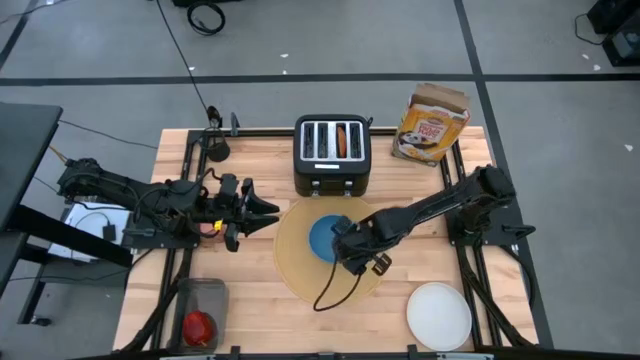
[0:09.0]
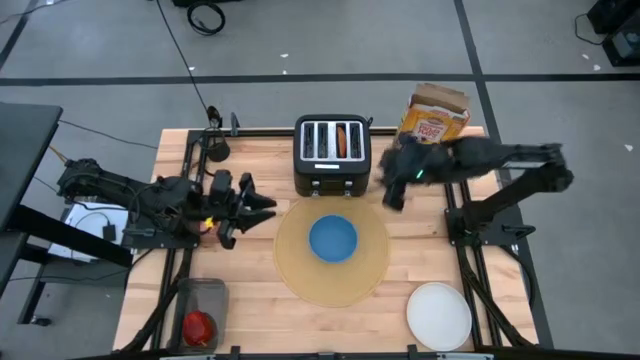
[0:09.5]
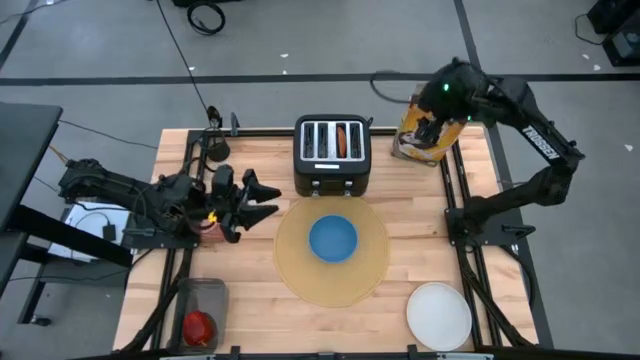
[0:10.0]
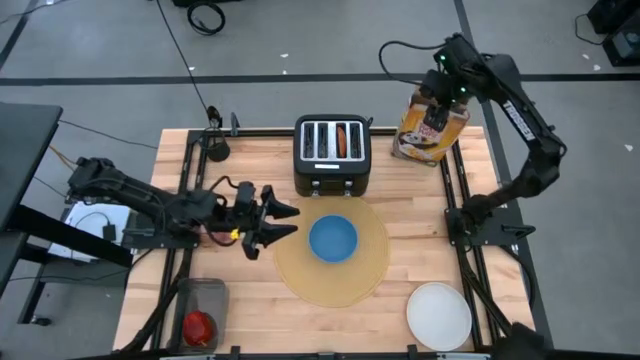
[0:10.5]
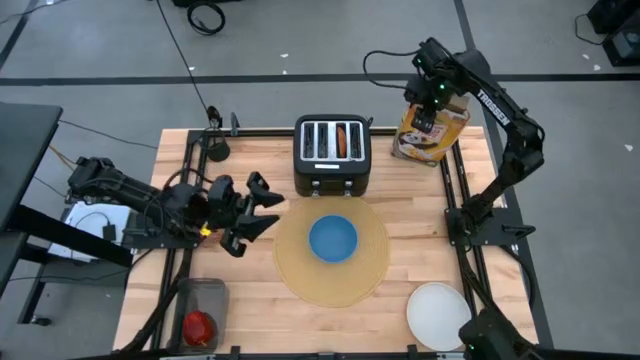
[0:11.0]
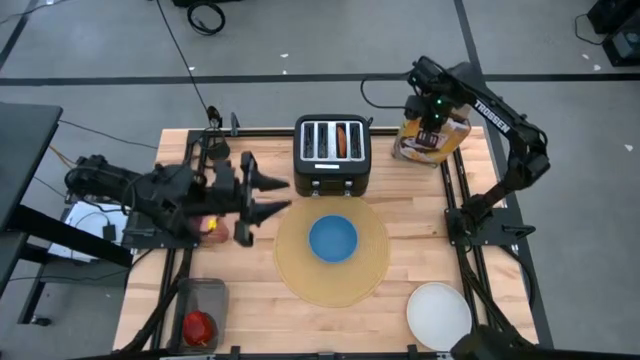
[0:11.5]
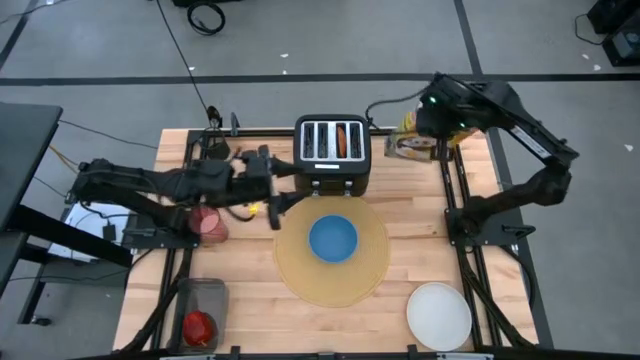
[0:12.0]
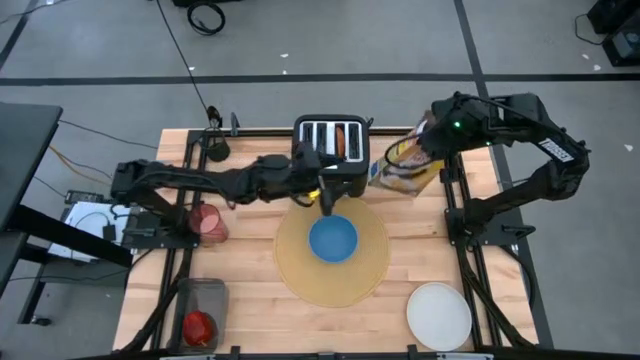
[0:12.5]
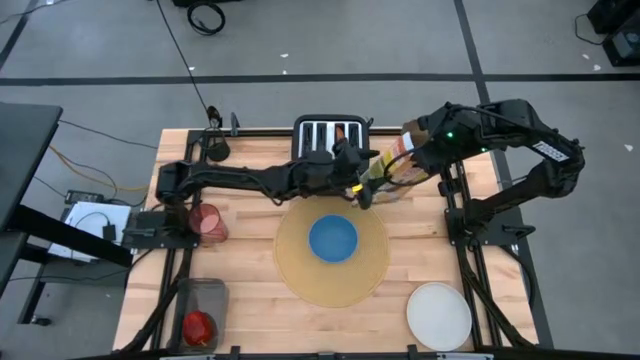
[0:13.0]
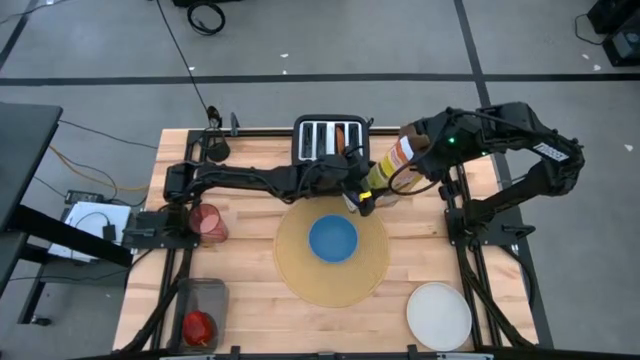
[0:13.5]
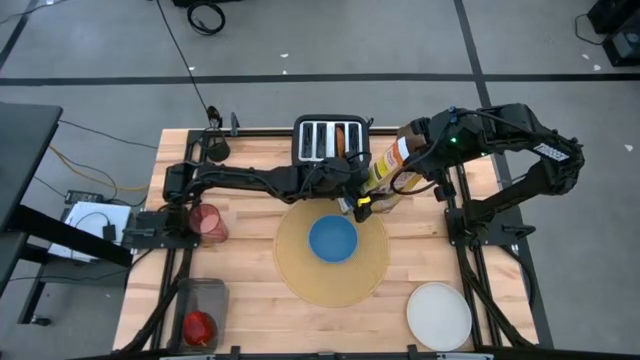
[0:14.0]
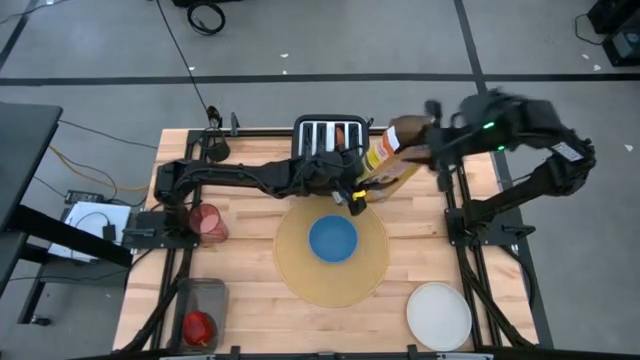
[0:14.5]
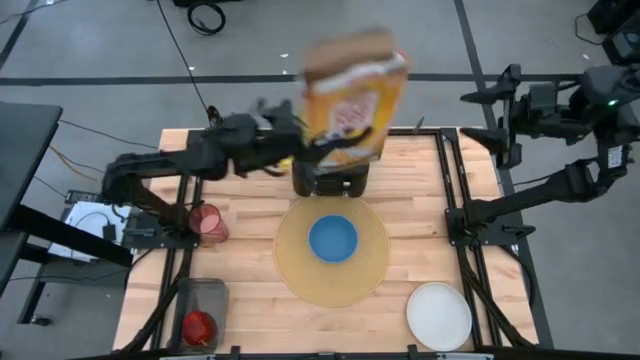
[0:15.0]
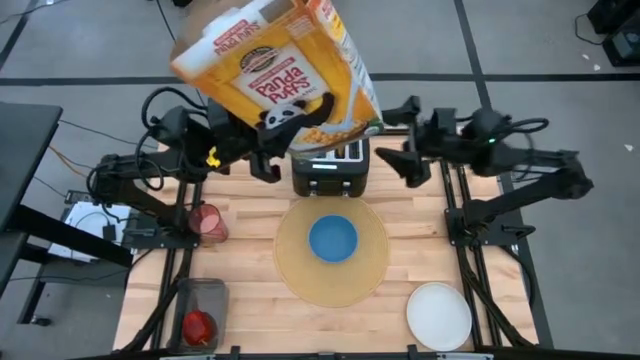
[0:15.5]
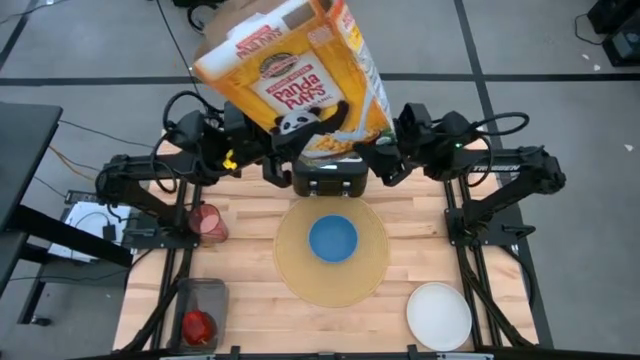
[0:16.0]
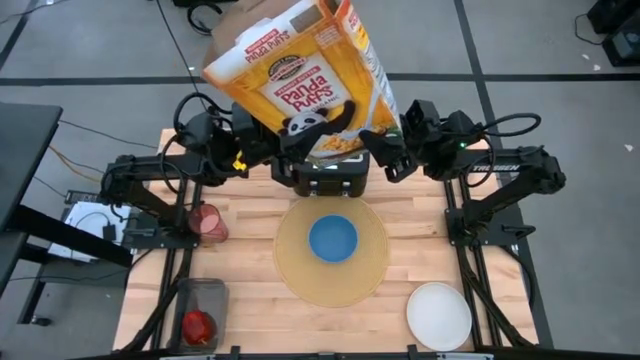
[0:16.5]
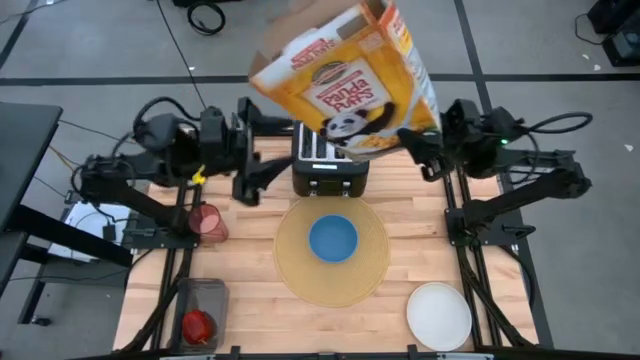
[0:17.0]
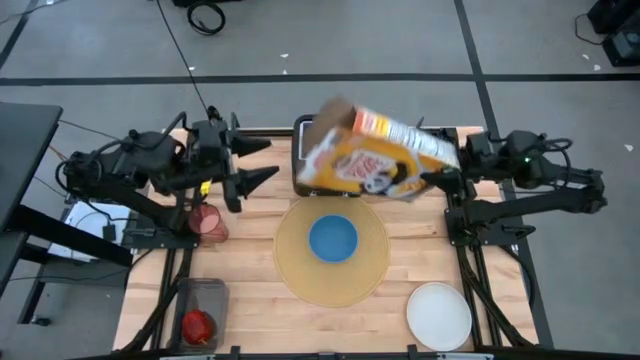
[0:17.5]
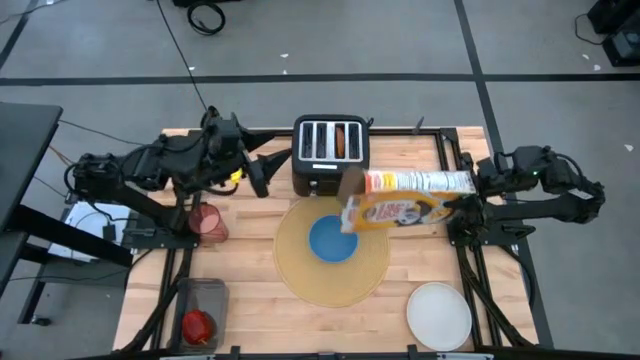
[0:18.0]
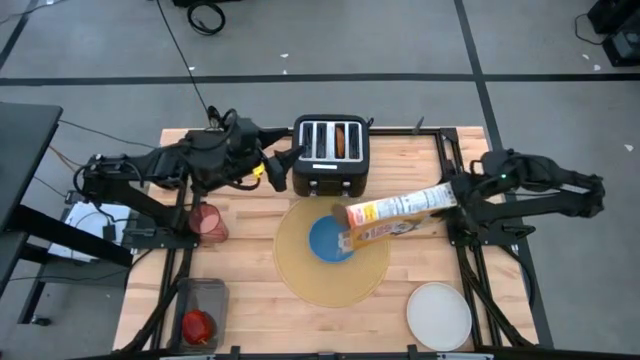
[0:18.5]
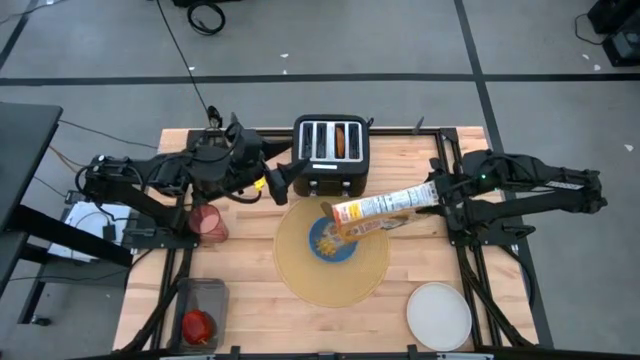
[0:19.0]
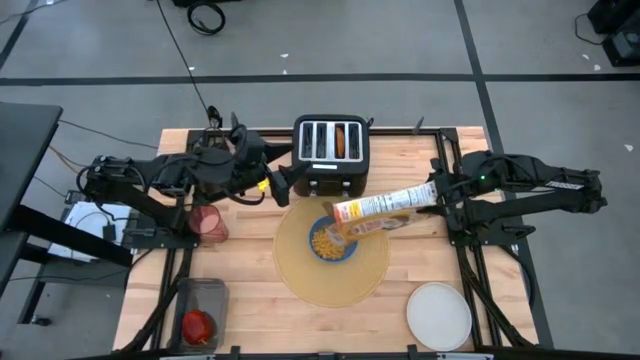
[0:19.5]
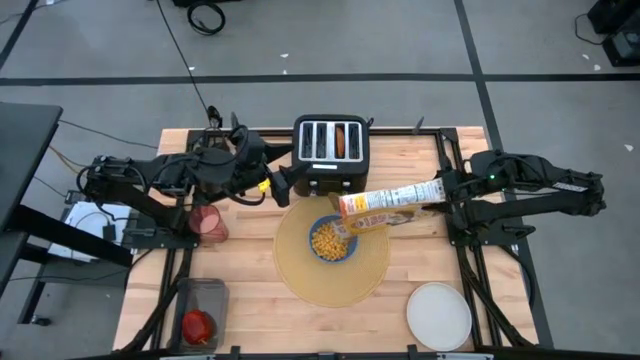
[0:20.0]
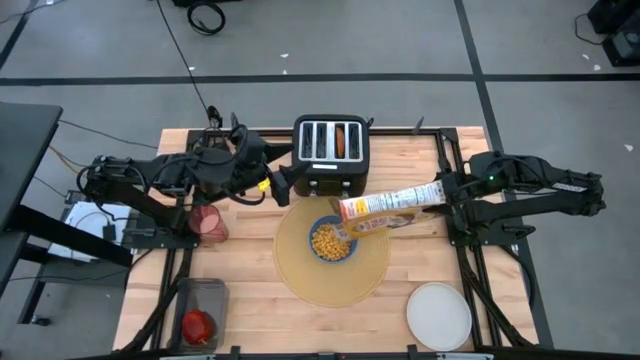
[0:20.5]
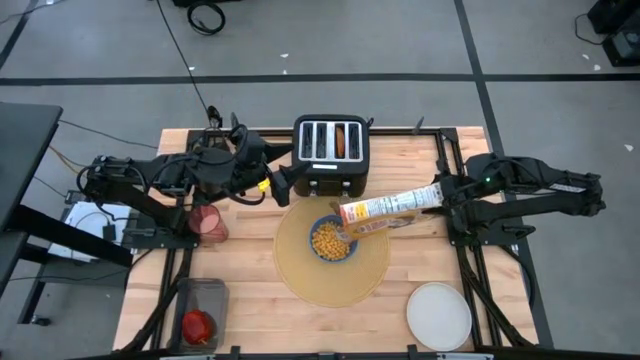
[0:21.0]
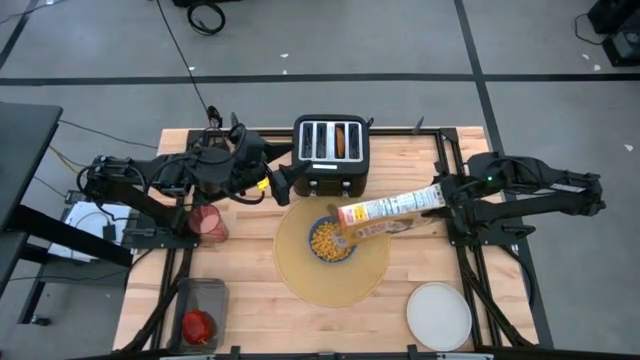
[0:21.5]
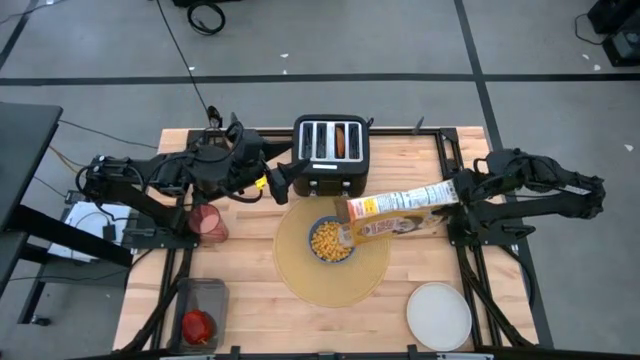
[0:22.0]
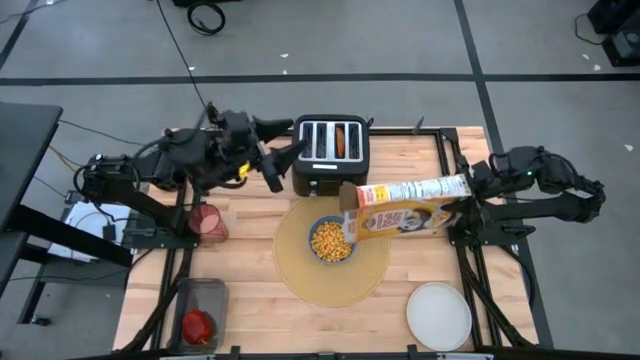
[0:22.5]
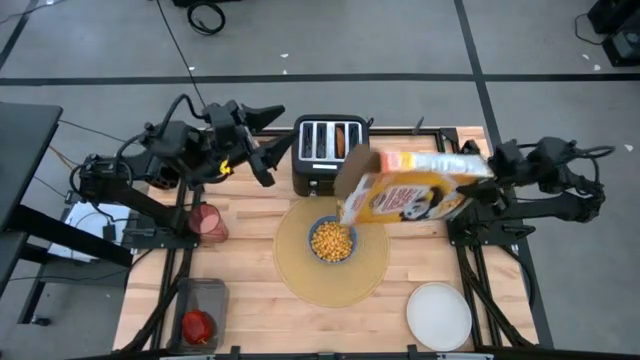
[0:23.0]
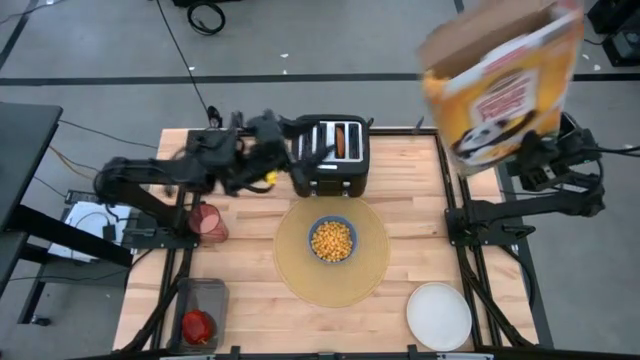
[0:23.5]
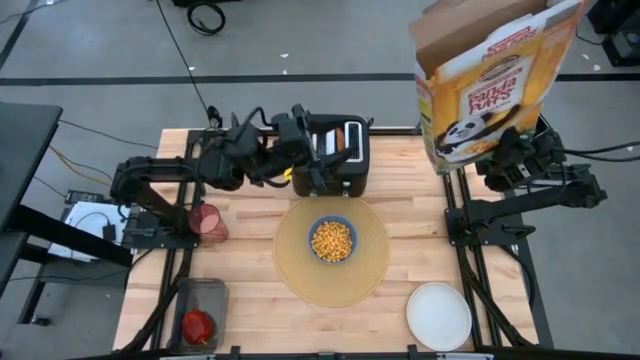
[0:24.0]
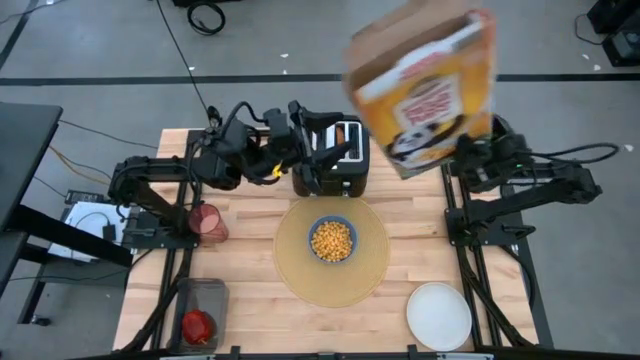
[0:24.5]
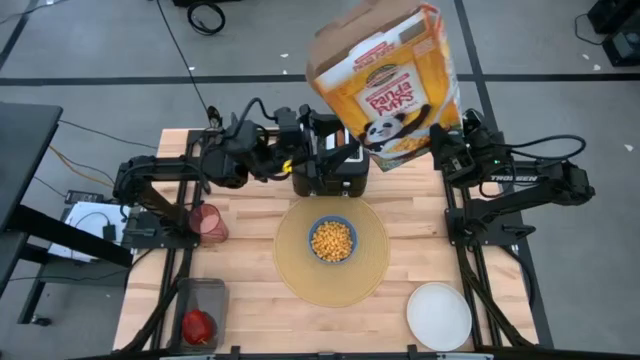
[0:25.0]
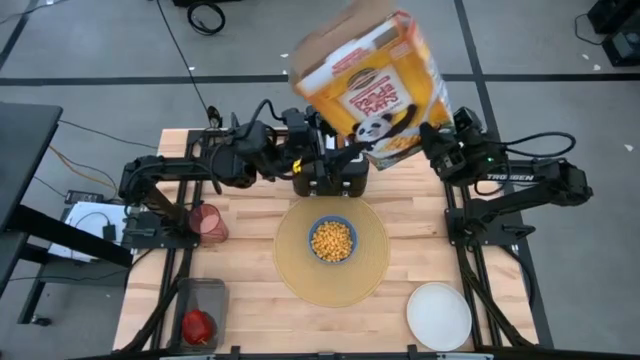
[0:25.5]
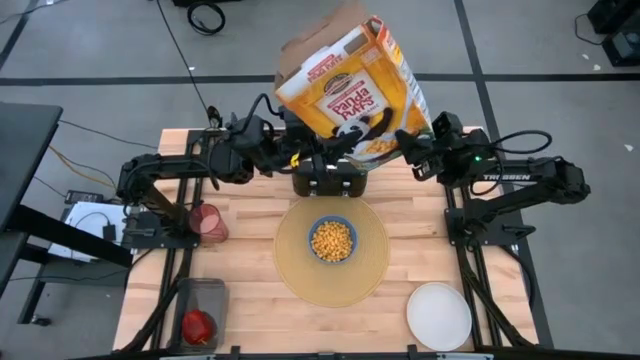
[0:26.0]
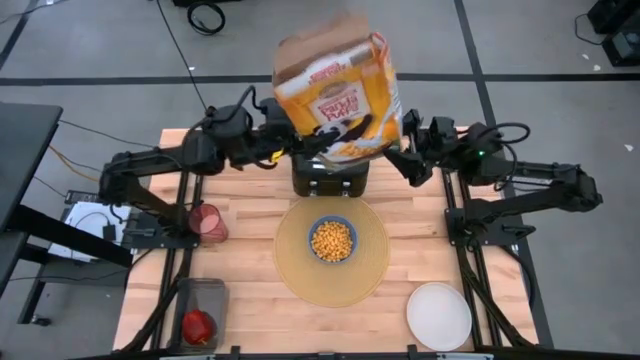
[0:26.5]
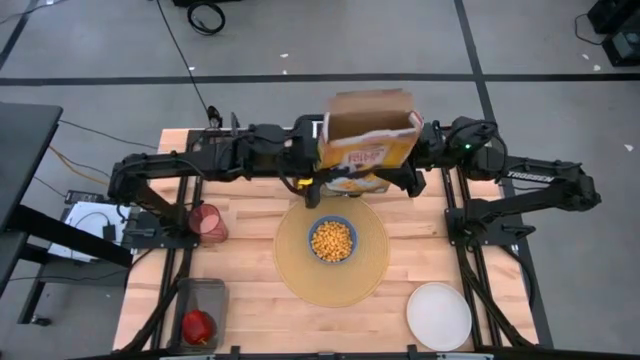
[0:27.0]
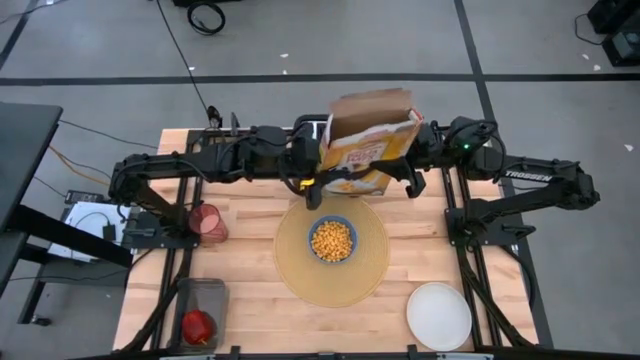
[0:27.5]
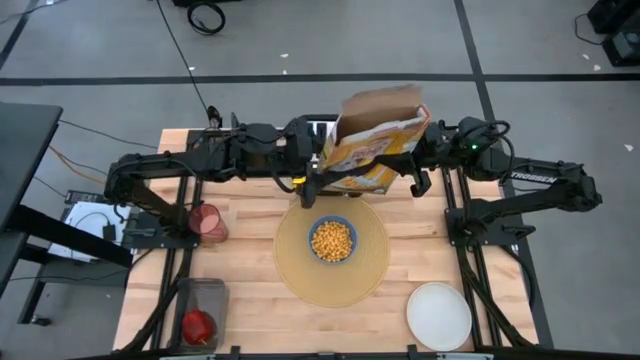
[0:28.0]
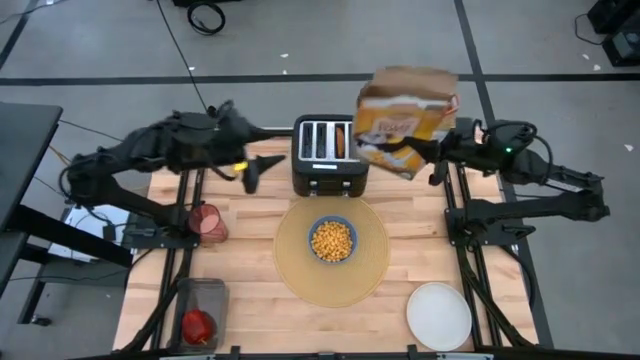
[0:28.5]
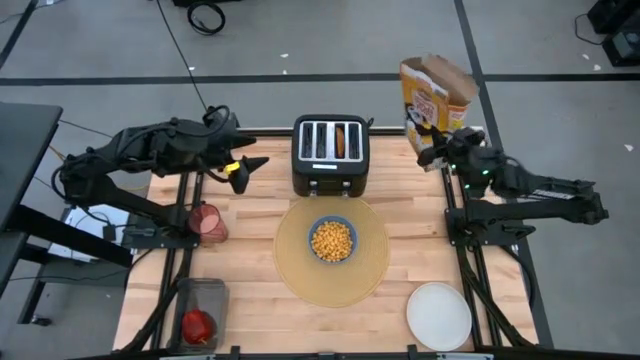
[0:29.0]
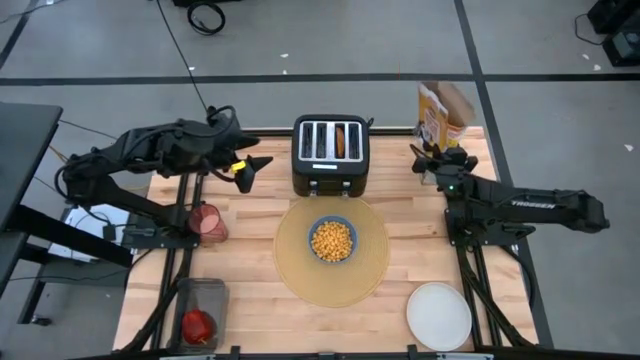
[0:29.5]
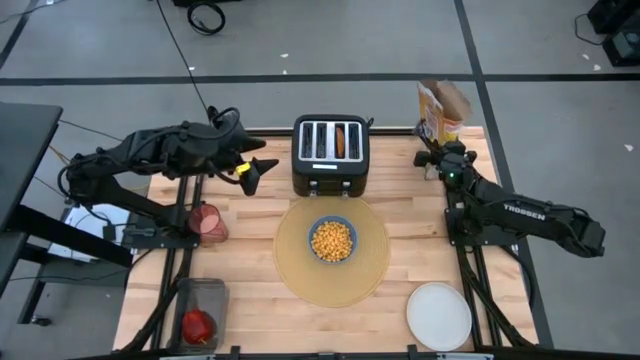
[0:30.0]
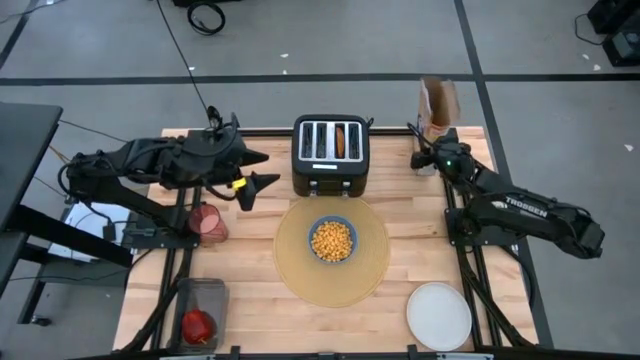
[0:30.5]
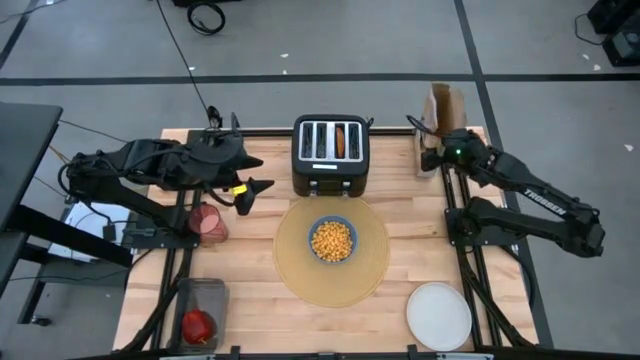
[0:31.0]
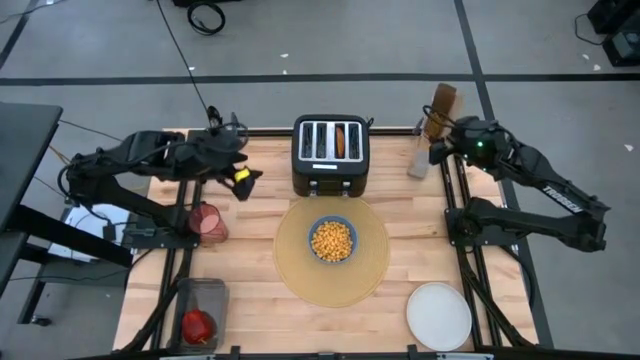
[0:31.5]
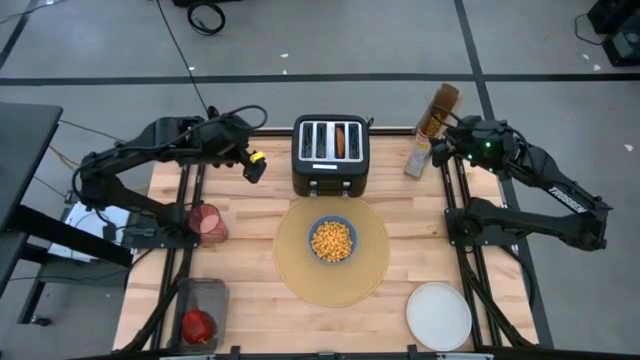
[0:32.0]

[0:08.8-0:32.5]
Task: Arrange a breakfast setting
Pour the cereal into the bowl
